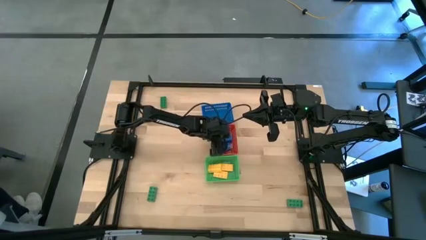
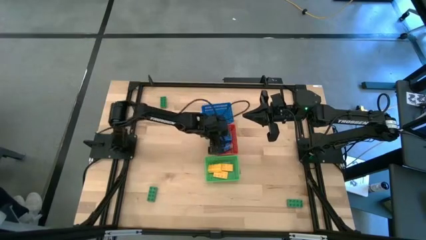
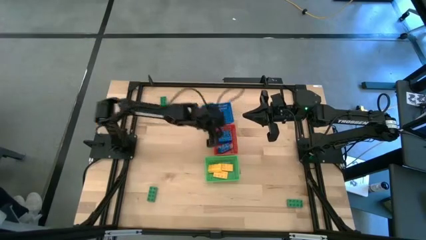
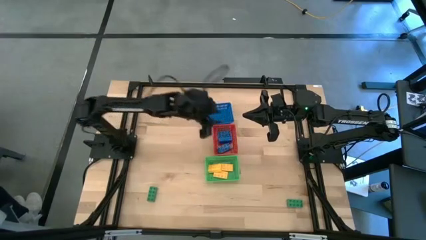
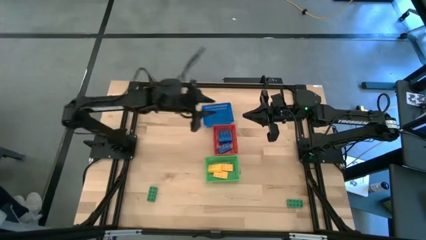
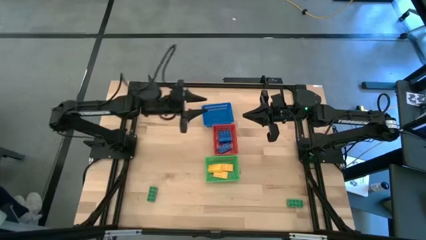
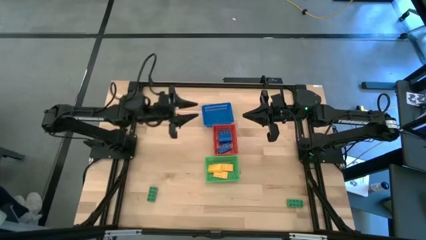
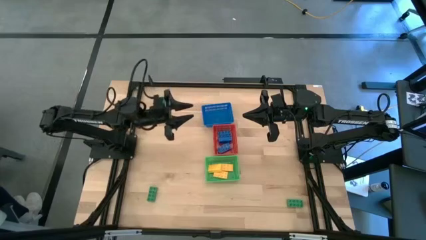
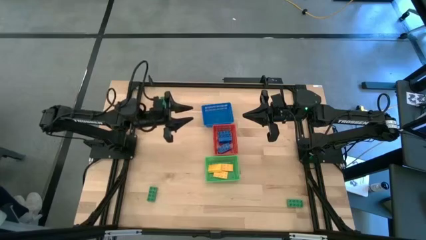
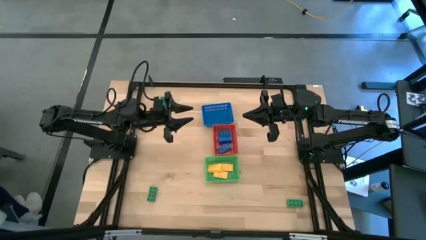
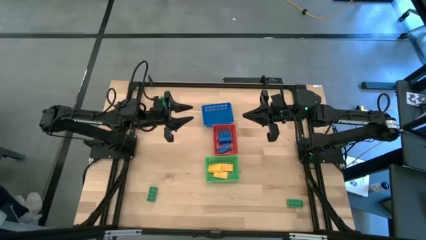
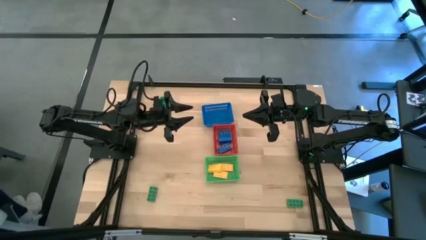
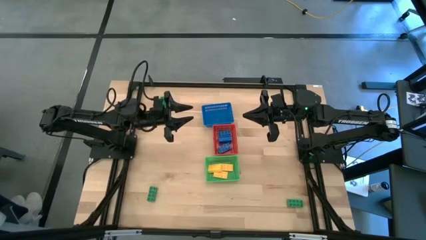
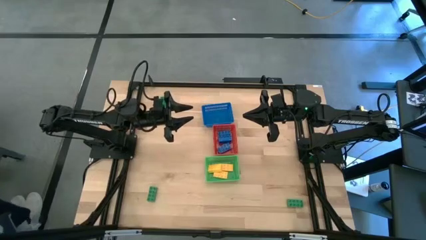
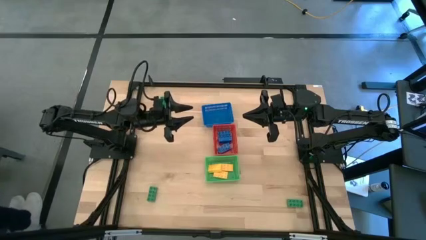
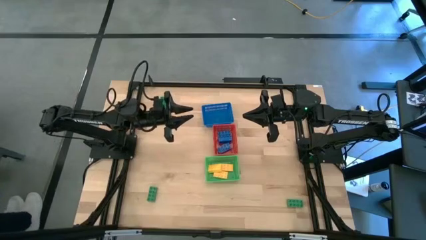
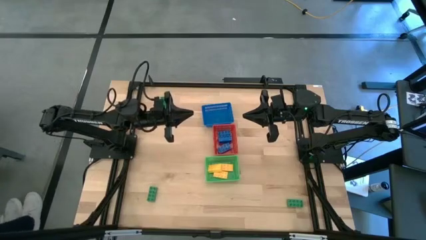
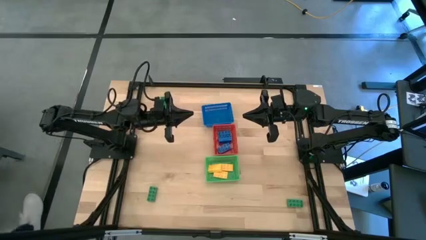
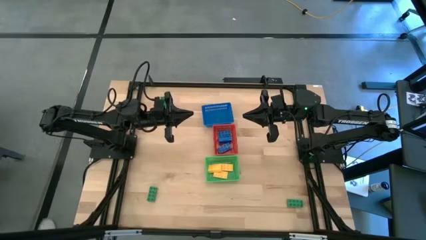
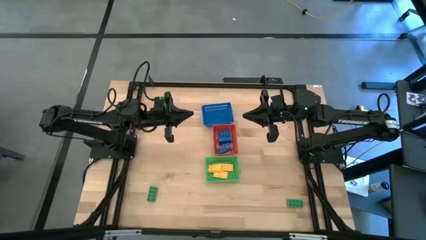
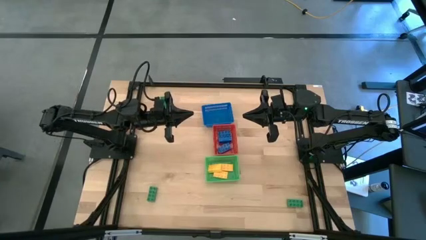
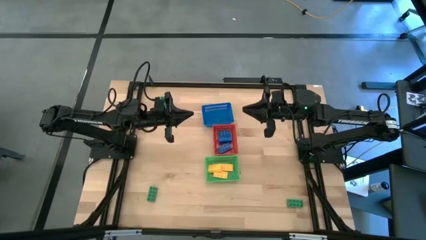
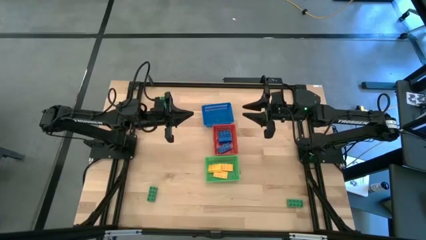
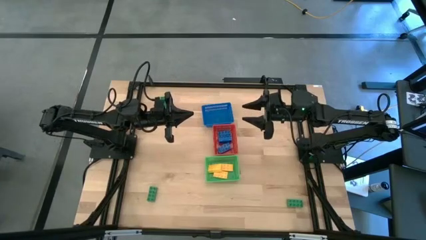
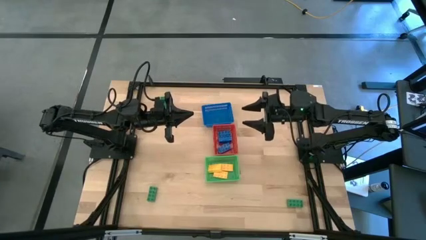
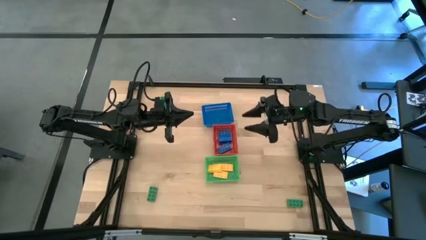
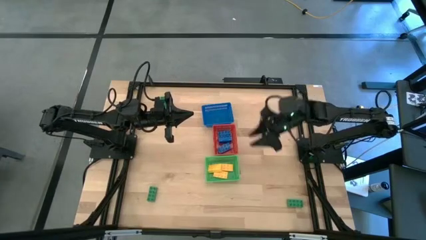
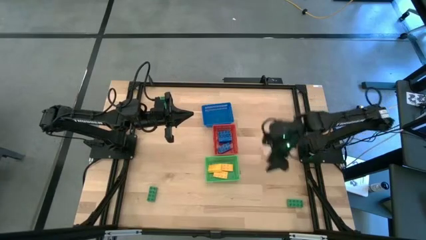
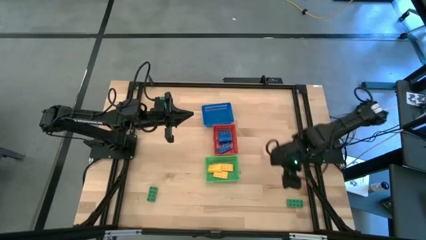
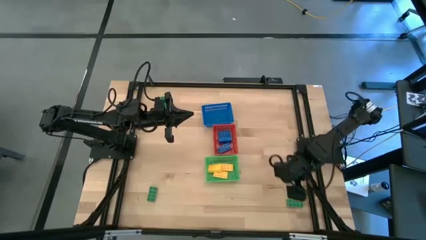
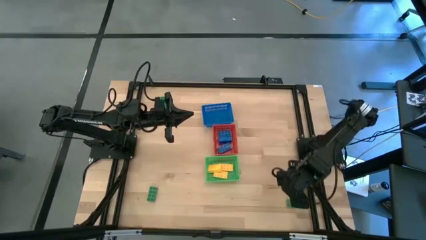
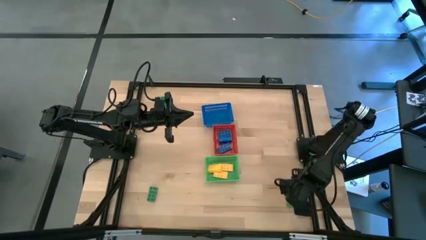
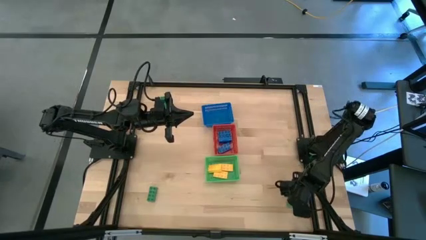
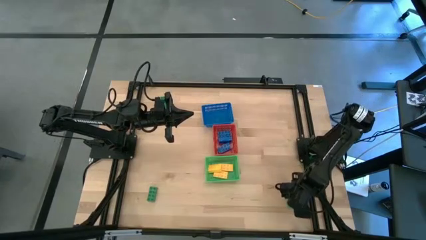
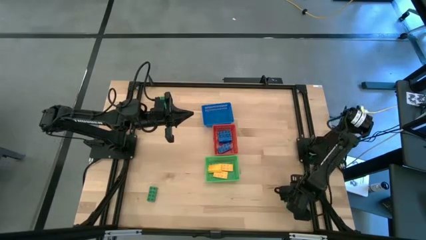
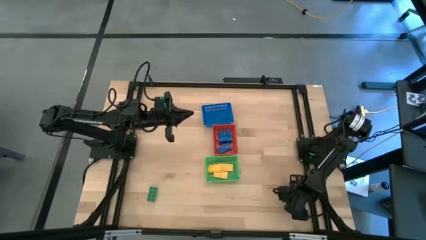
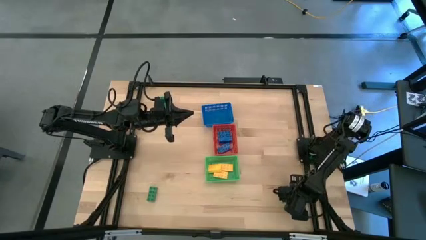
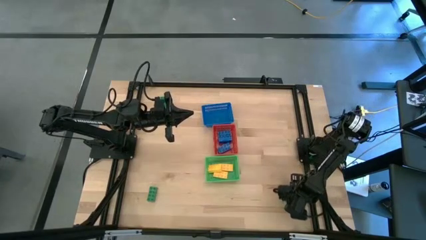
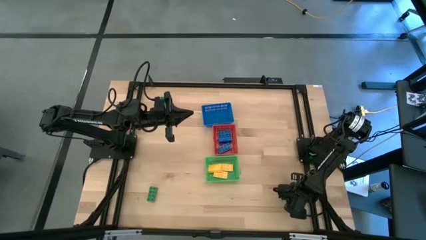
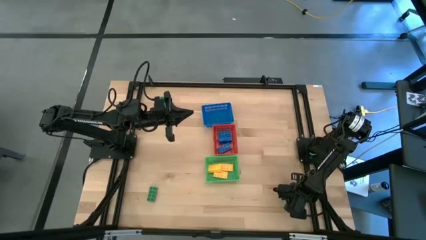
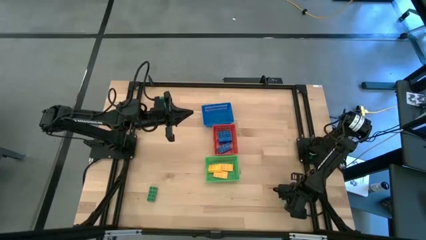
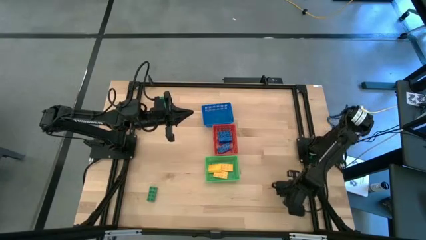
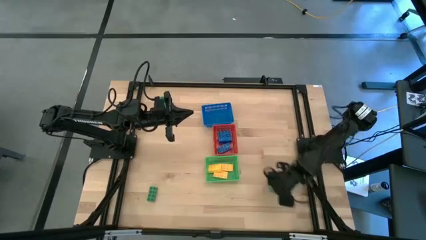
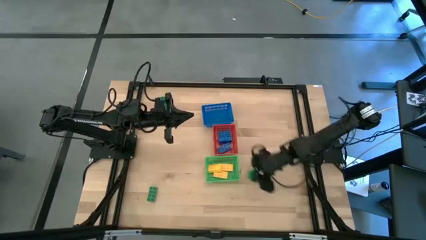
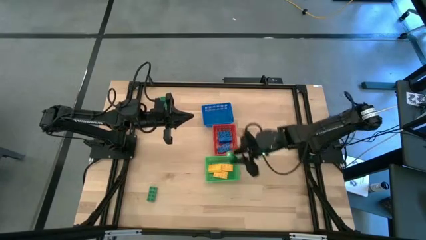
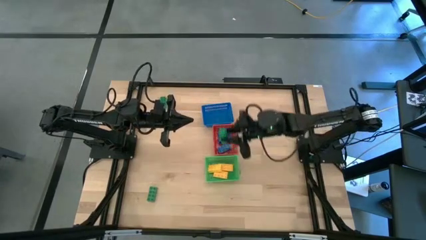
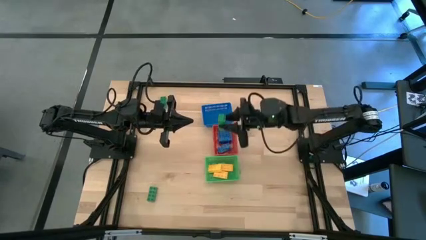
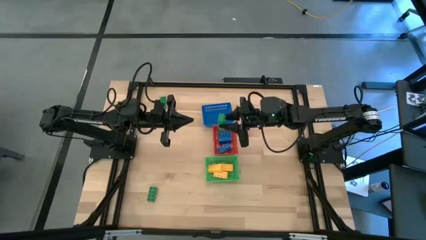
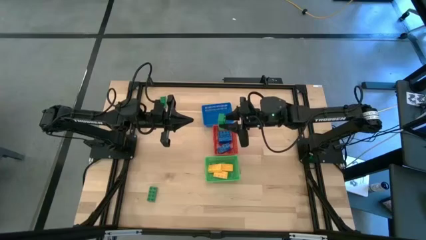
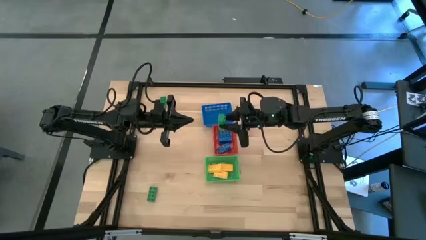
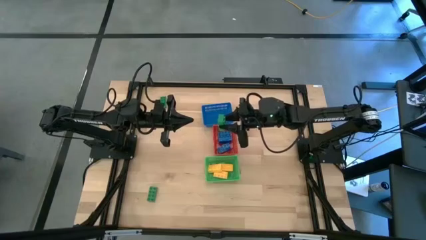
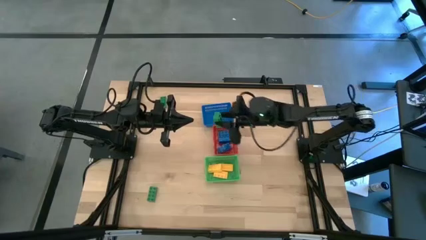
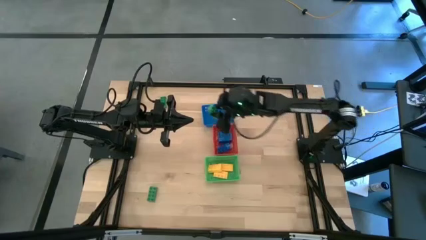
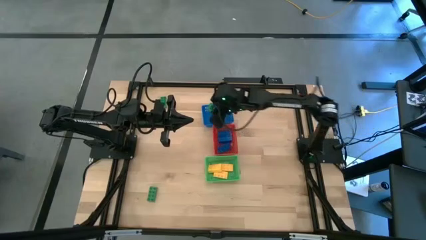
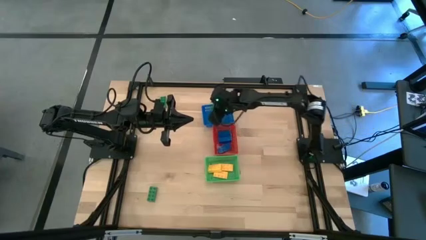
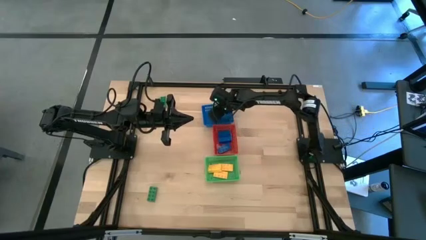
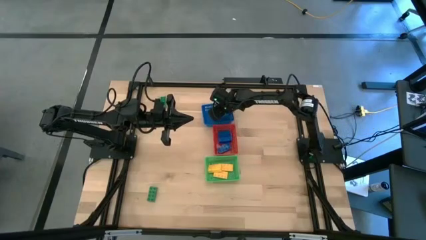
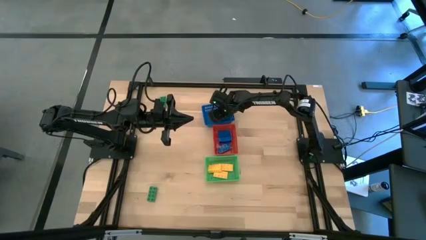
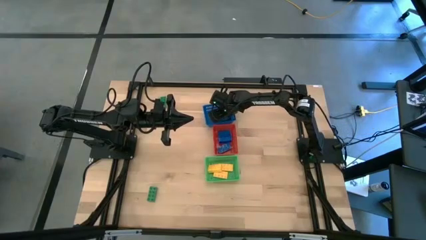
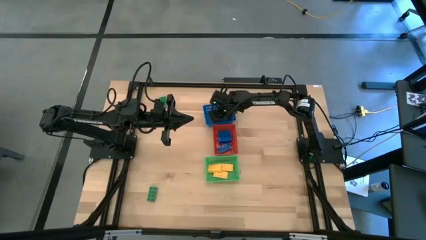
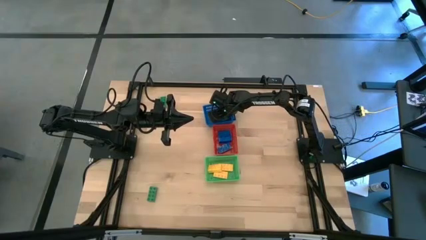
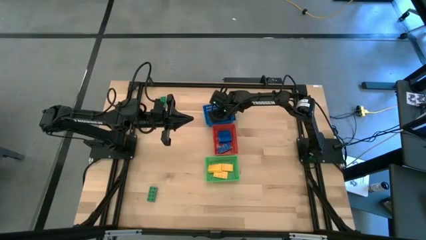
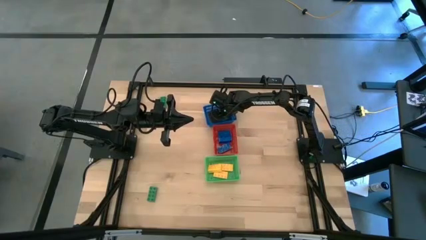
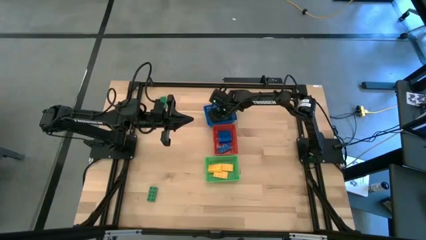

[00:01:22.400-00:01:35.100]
Task: Sort & place blocks by color
Put the right green game piece into the blue basket
